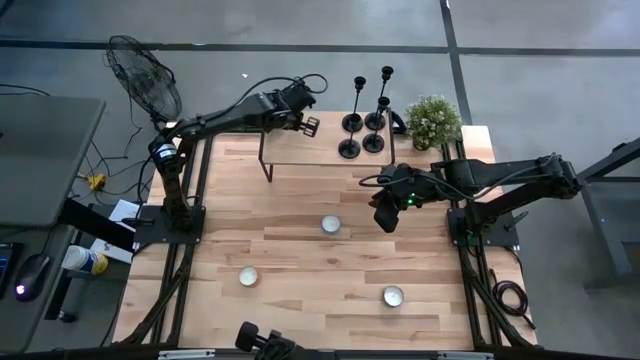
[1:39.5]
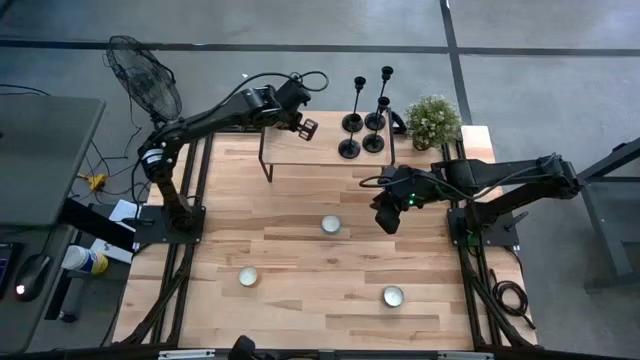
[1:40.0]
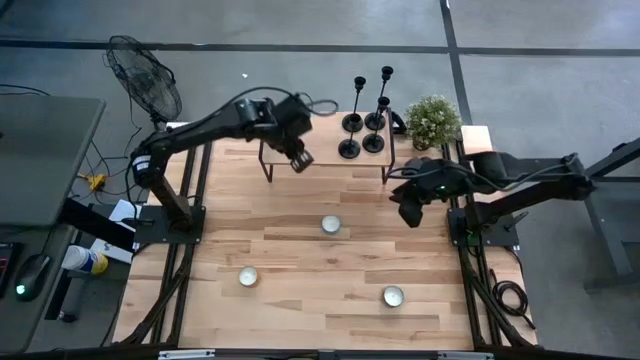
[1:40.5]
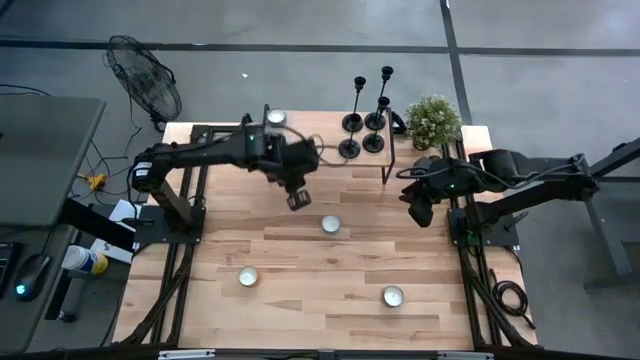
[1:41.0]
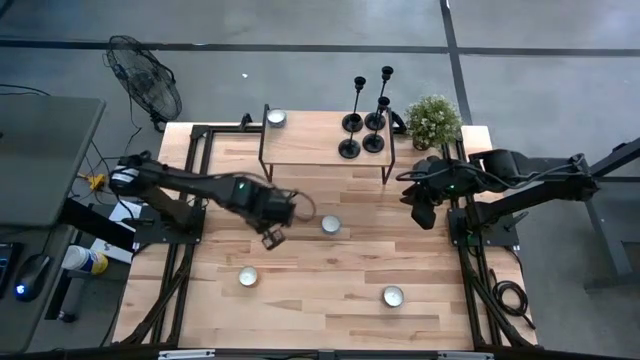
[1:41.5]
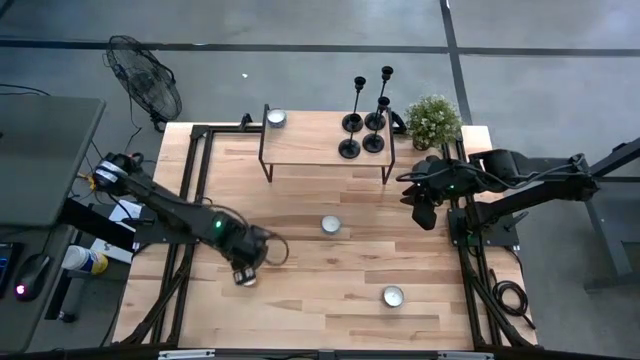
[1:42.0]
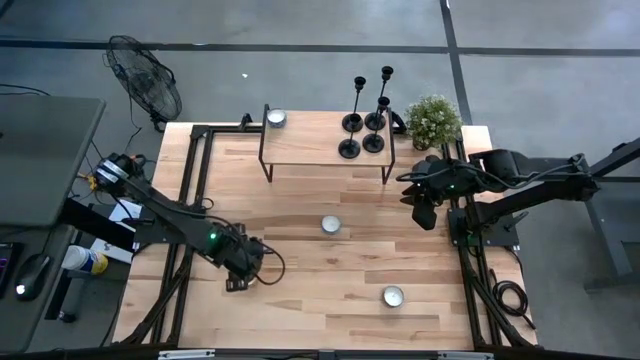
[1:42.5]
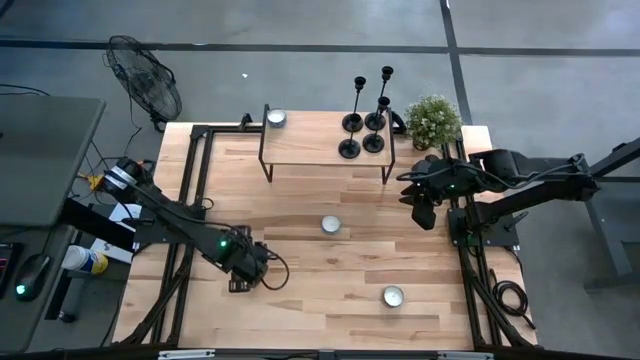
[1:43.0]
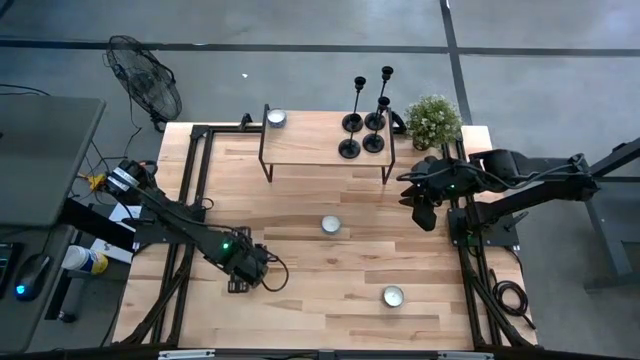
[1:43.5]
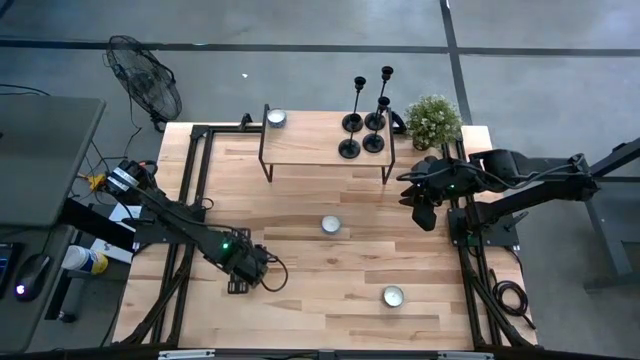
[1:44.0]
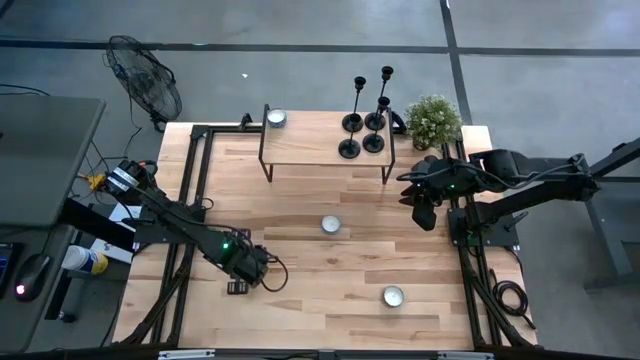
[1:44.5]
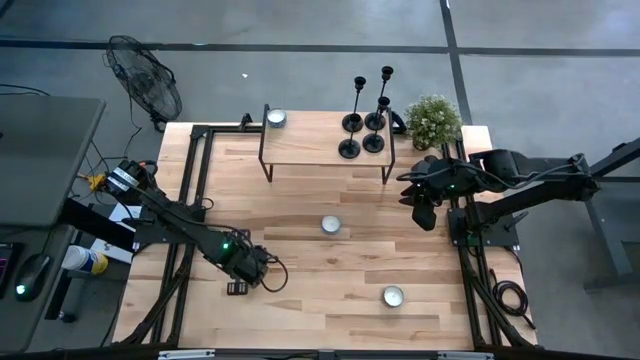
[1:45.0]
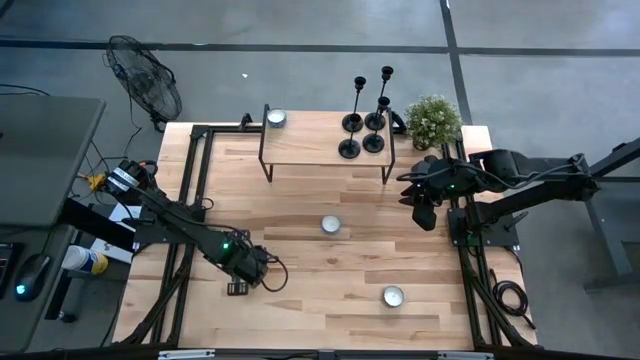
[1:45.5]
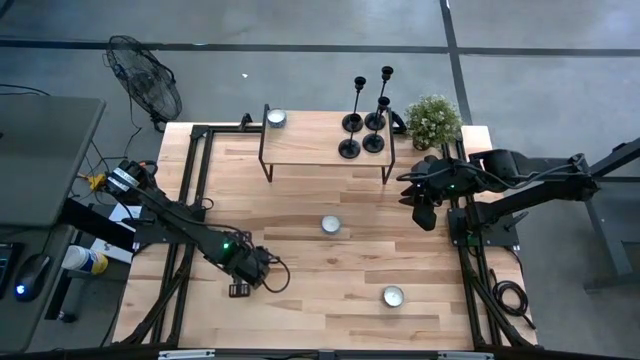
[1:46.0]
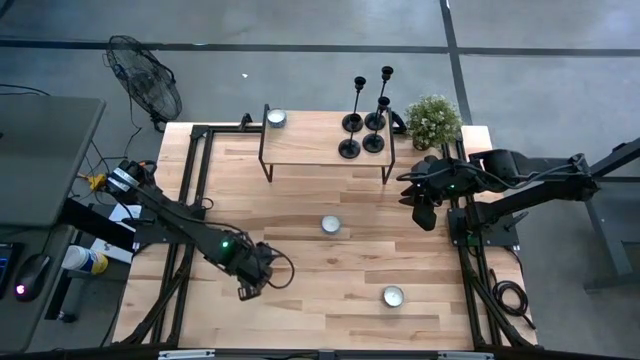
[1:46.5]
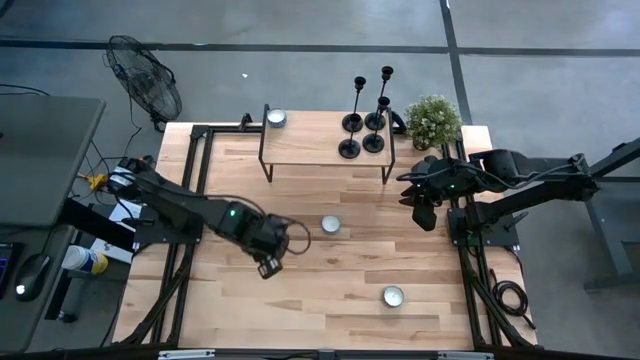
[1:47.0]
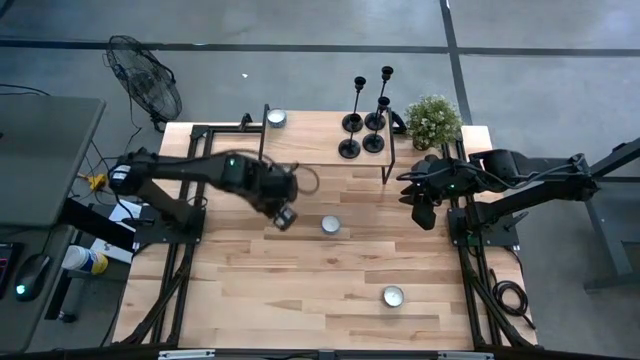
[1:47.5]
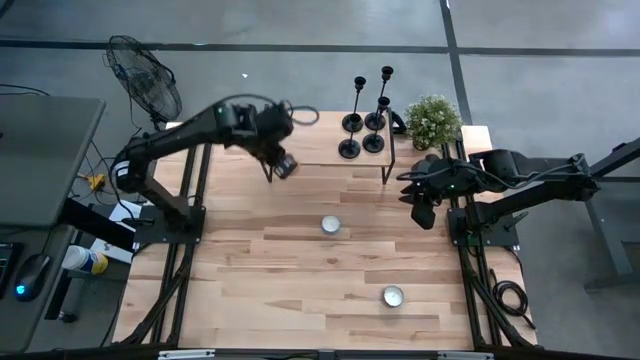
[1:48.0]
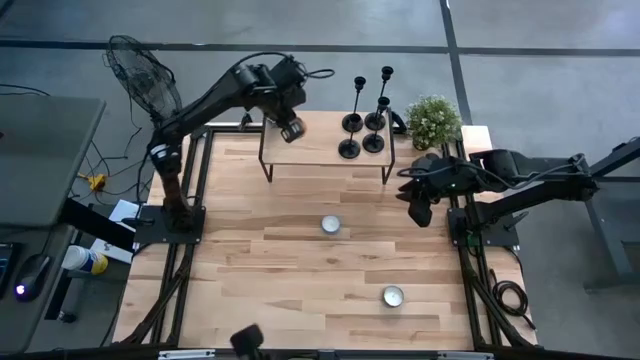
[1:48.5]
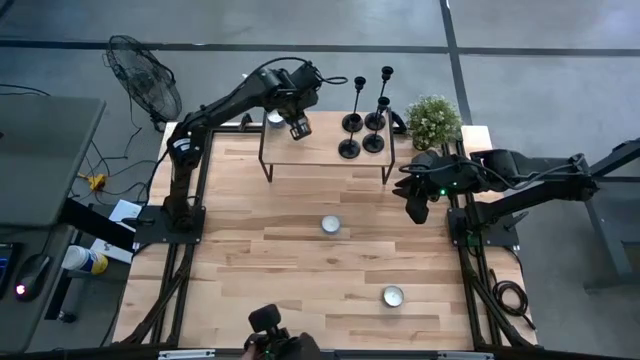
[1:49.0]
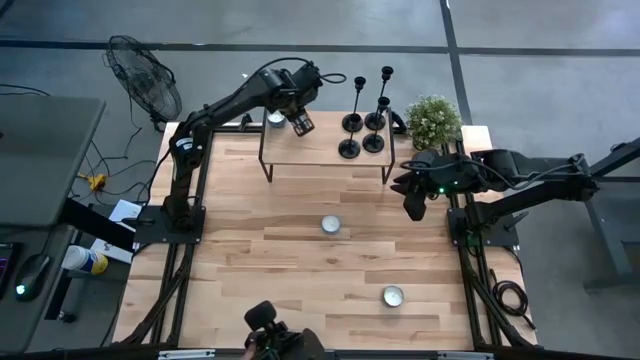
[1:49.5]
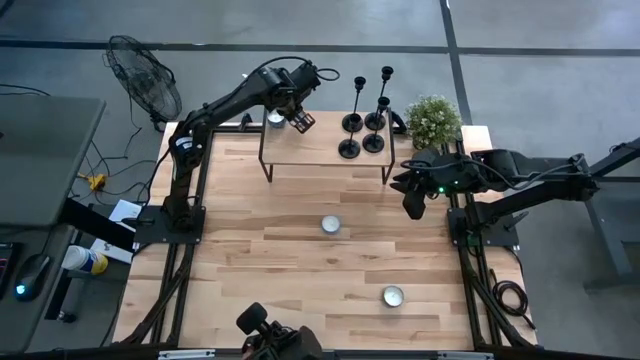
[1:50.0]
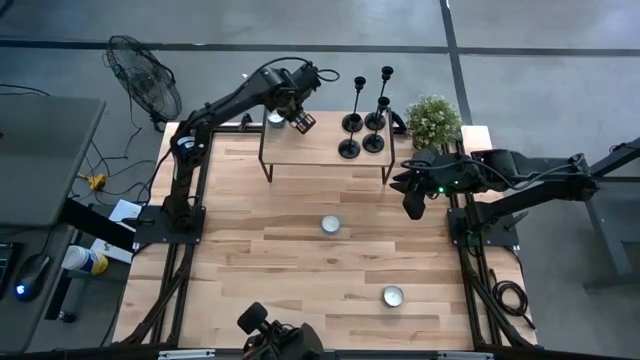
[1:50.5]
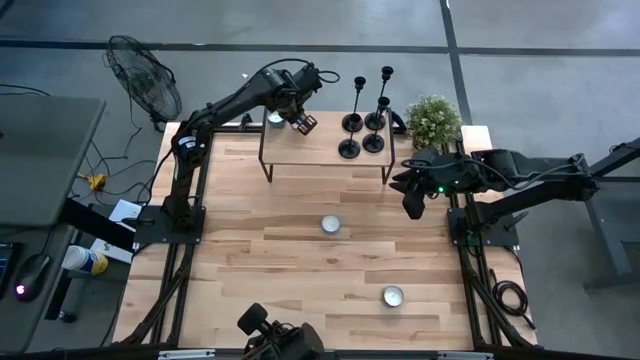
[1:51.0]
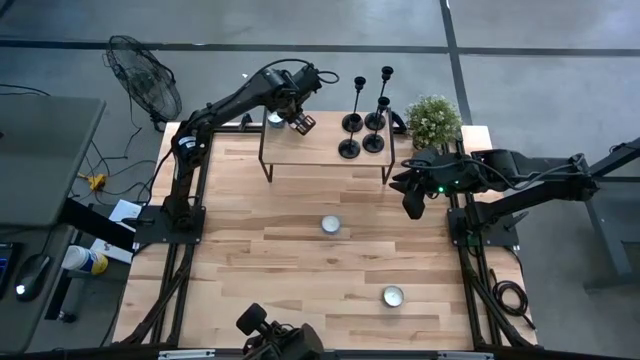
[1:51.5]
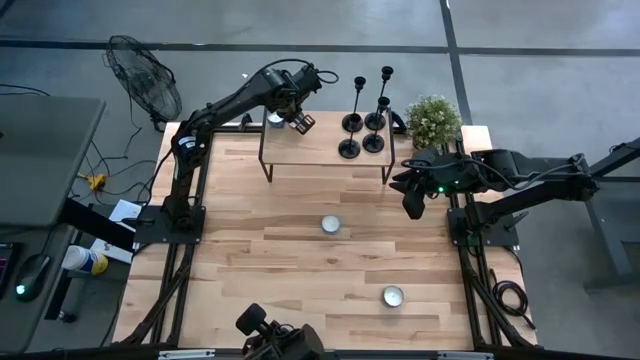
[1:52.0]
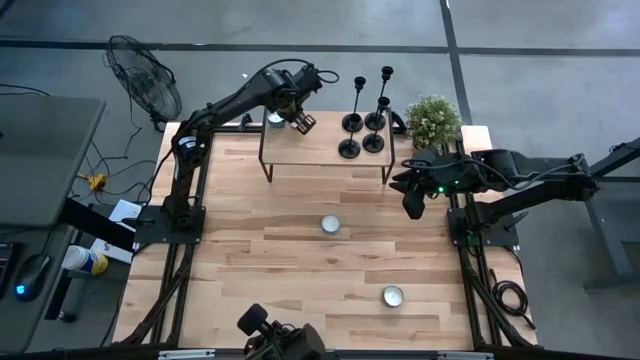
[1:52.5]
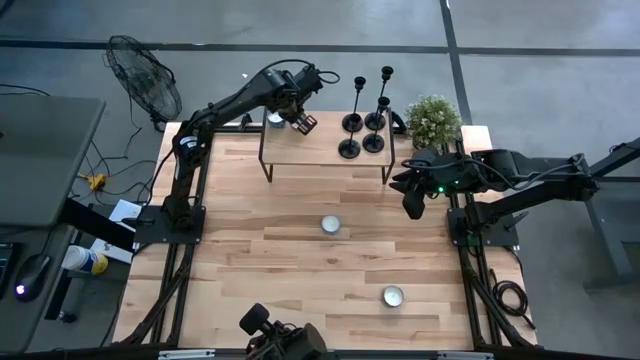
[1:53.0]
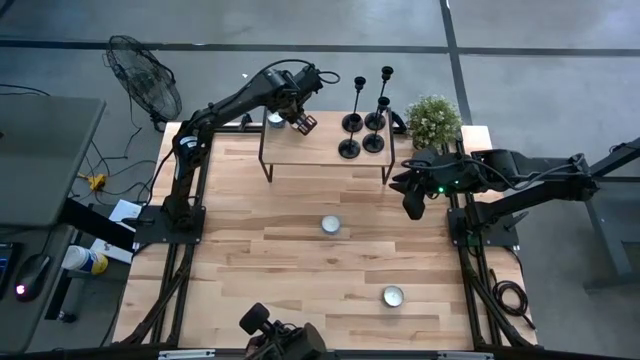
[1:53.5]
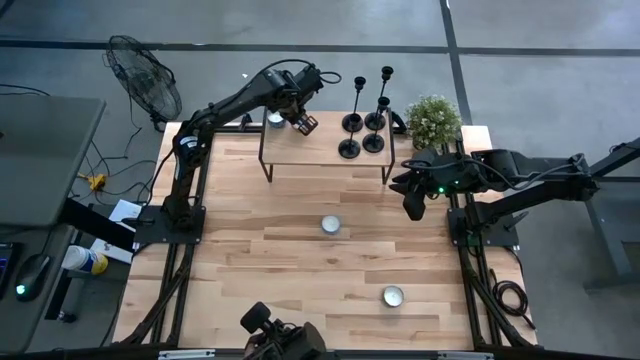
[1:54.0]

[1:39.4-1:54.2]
Task: Pick & Place candle stick holders
Put the orange scented candle on the shelf

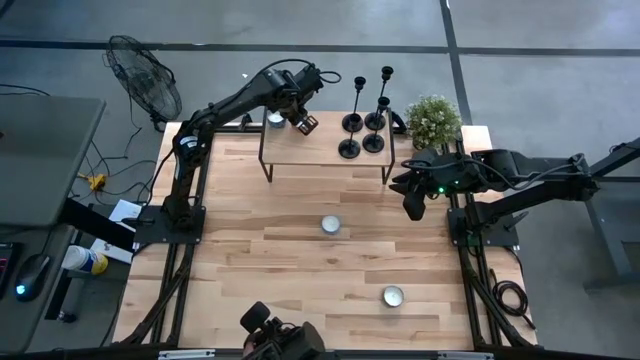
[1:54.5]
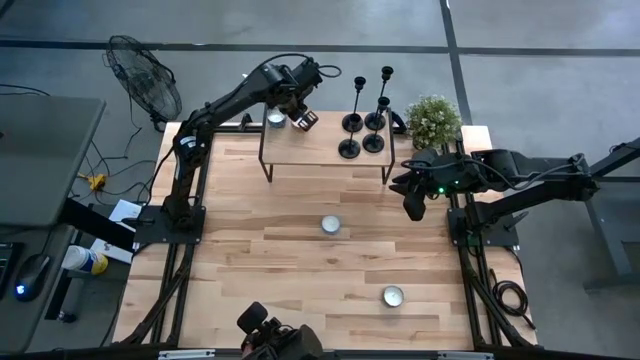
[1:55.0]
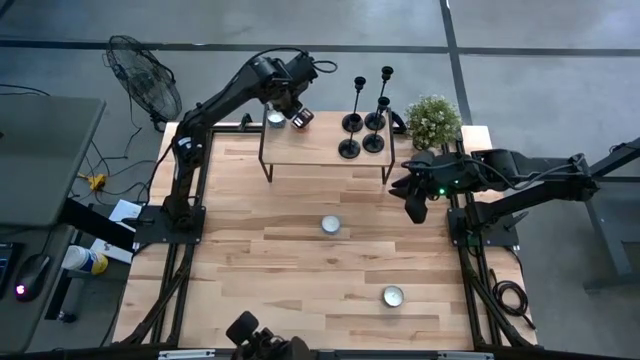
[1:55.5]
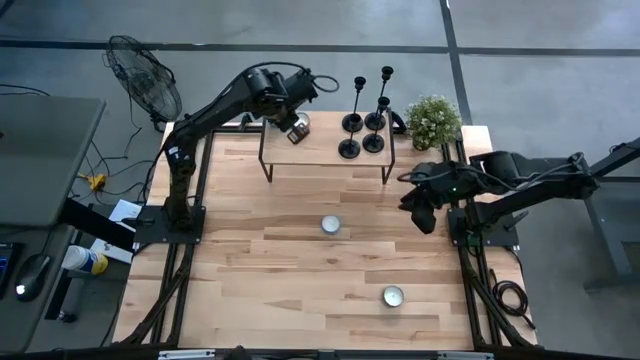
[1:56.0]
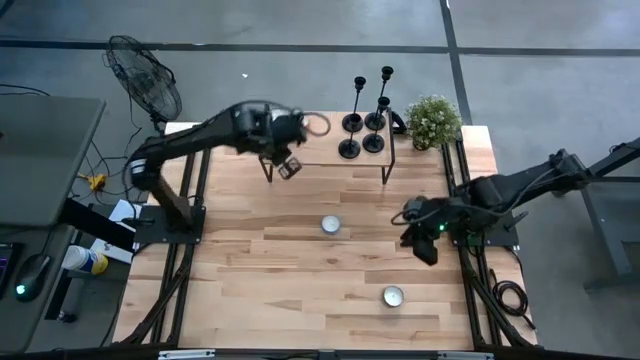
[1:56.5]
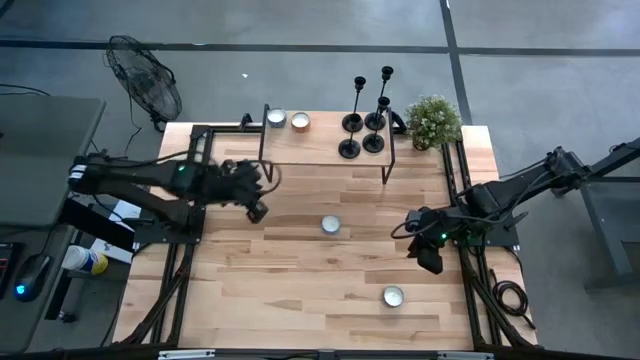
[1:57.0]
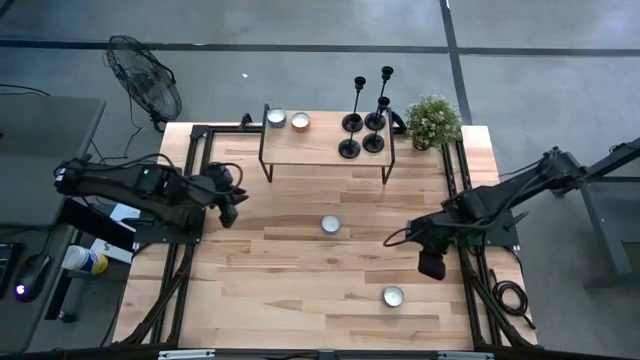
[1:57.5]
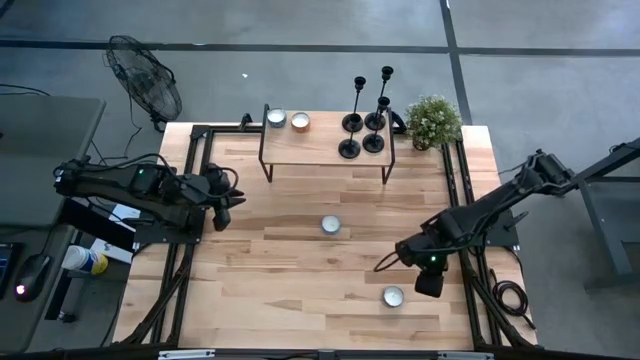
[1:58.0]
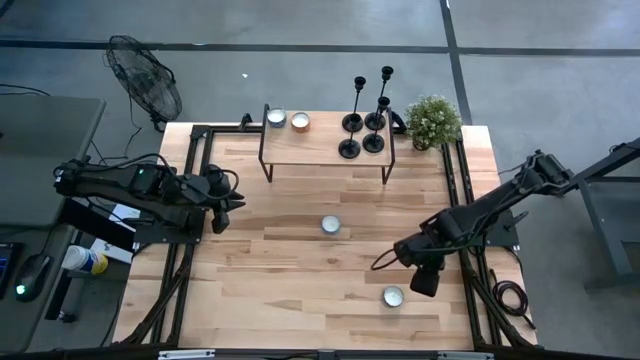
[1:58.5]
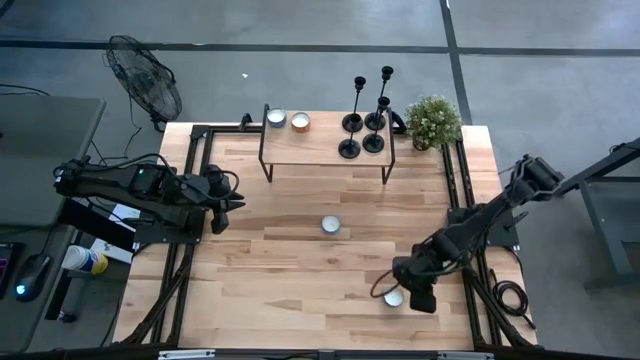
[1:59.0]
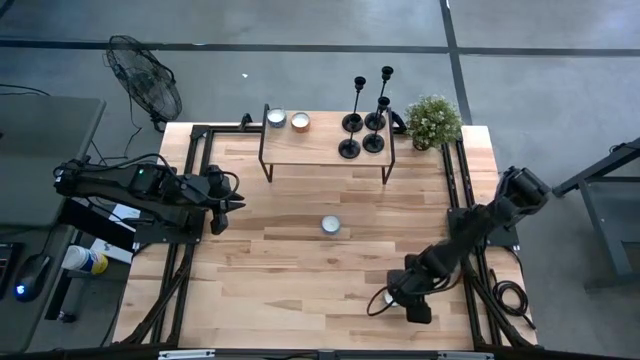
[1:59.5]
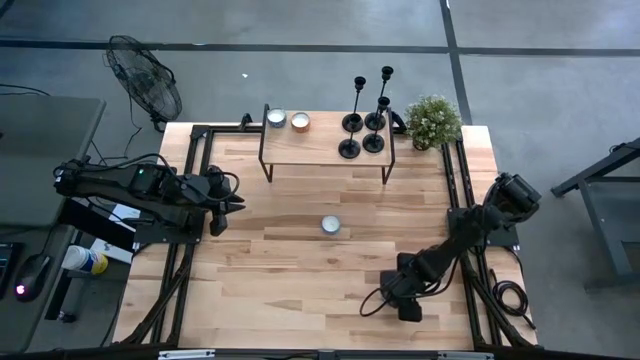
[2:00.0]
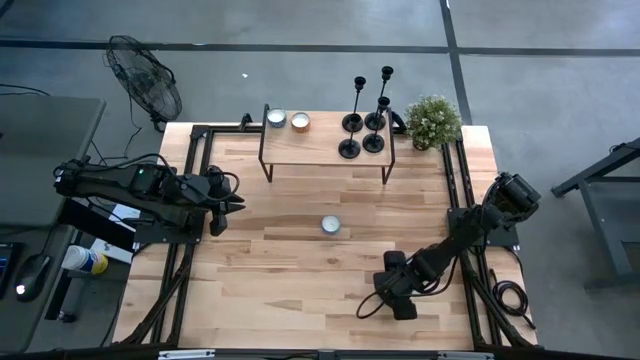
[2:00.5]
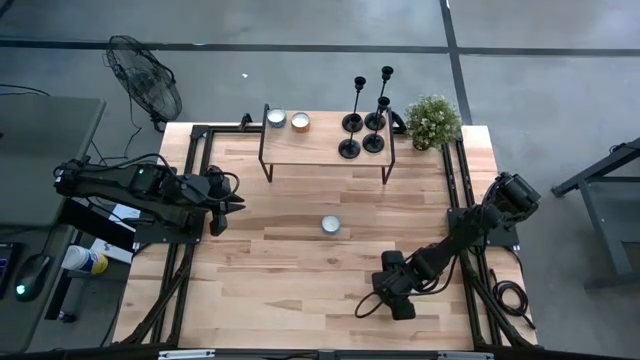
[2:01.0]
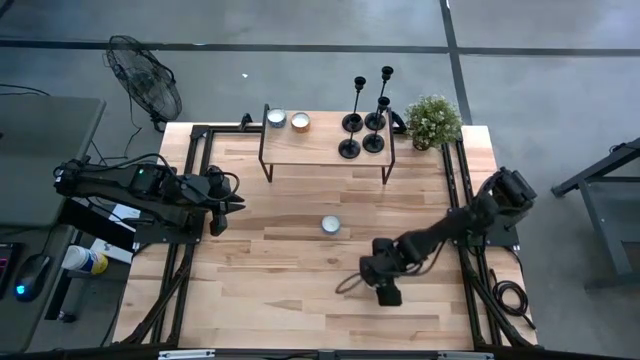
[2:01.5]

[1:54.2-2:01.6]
Move the brown scented candle to the center of the table
